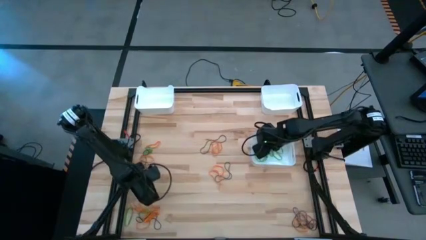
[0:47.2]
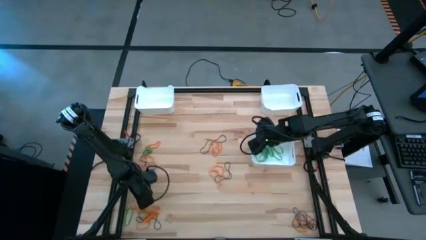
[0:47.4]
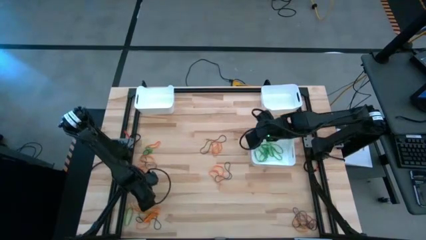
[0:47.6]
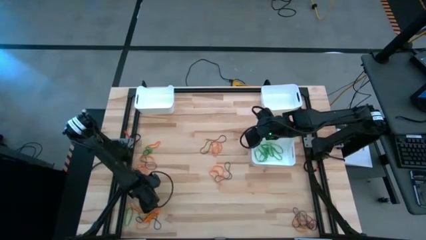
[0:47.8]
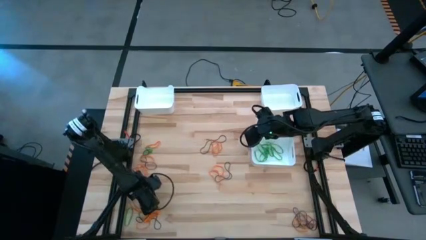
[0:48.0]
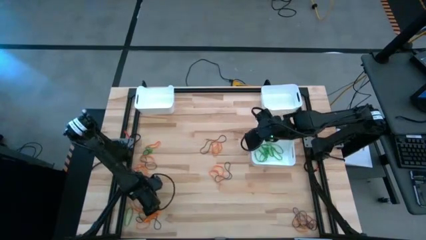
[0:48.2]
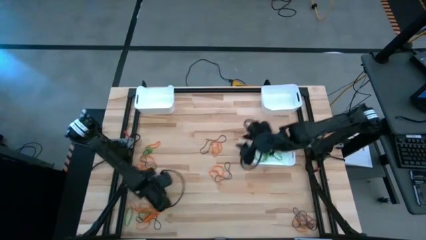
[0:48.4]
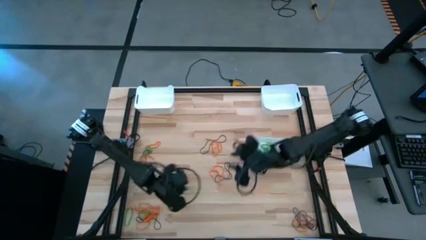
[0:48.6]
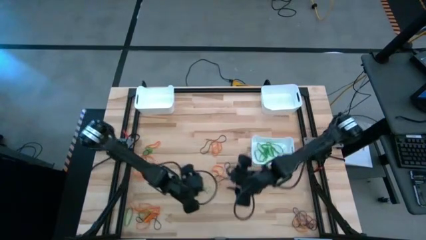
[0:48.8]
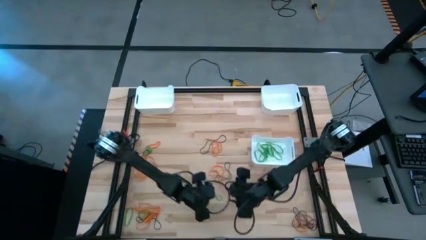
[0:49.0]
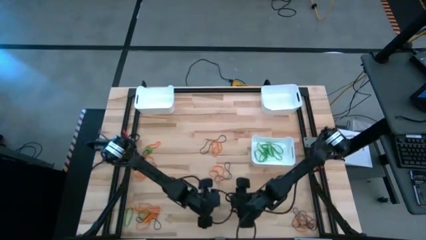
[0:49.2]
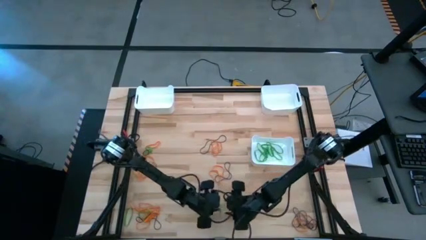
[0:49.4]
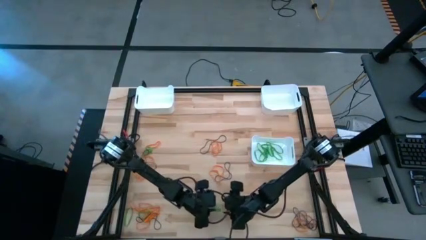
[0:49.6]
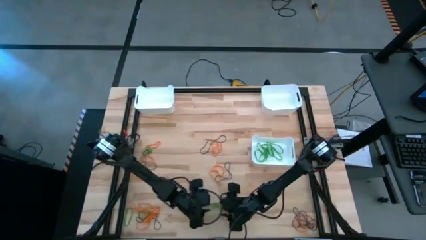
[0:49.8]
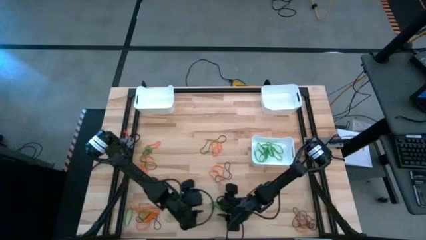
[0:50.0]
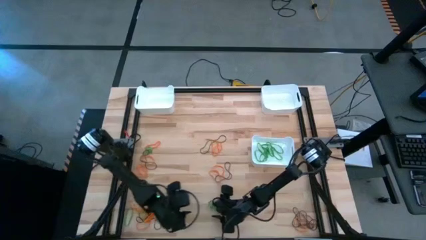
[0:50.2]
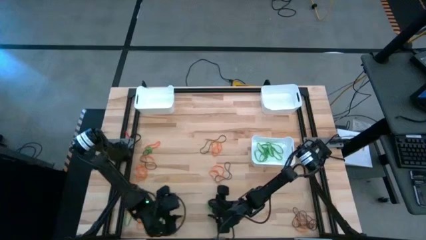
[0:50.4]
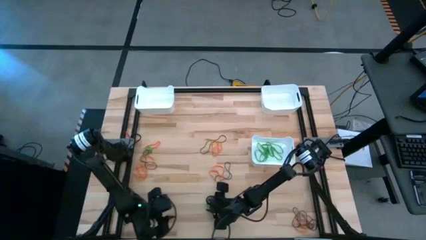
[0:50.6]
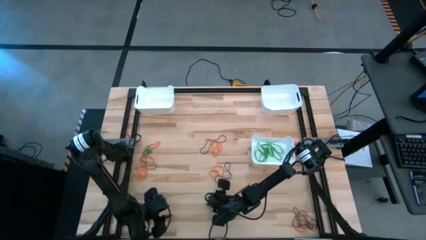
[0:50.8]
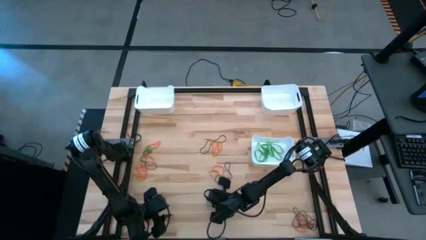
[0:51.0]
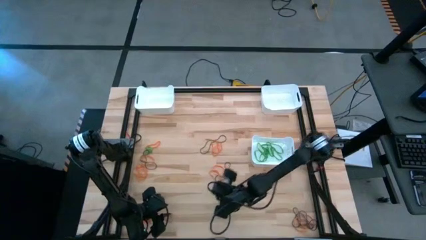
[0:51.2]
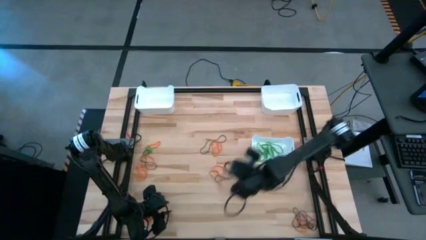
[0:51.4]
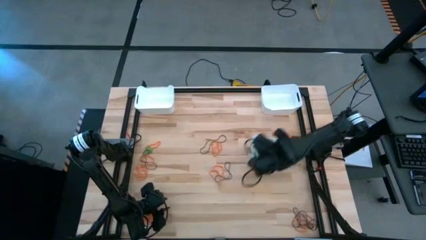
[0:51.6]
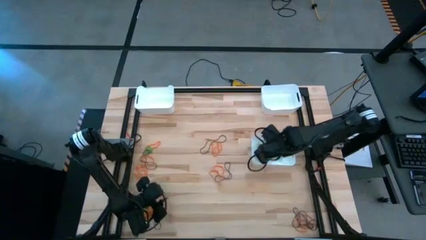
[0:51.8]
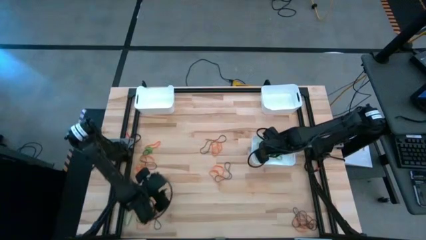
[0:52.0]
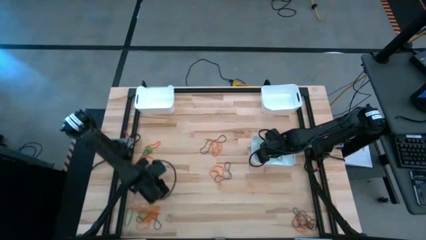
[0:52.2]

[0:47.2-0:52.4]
Task: Sort rubber bands into baskets
Put the green rubber band into the bottom white bin

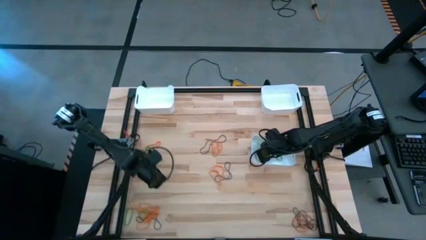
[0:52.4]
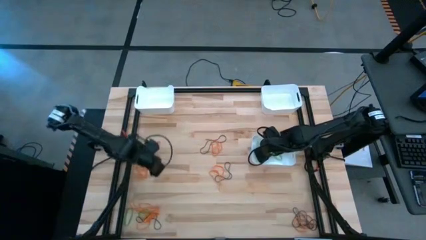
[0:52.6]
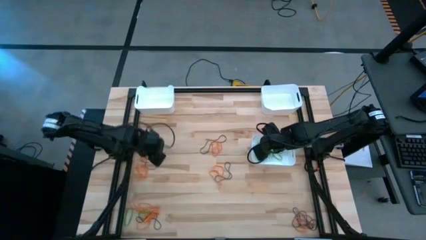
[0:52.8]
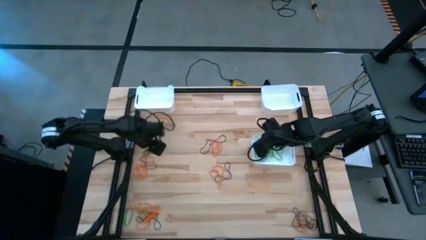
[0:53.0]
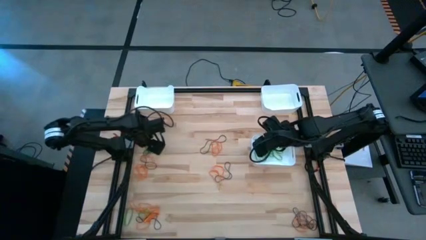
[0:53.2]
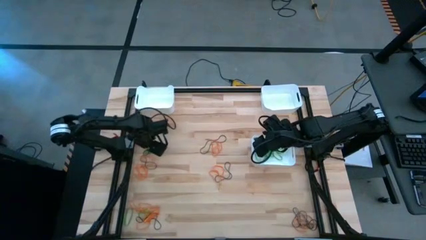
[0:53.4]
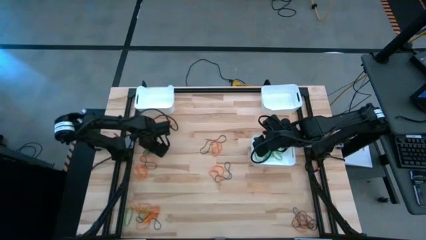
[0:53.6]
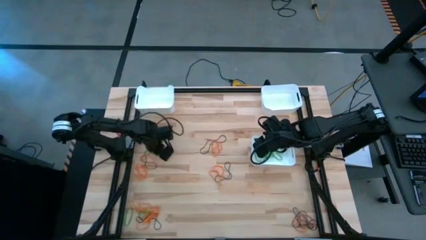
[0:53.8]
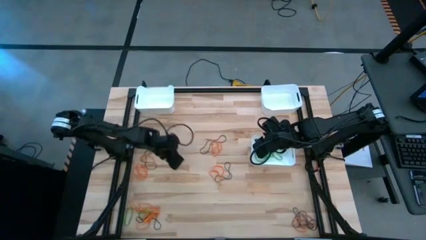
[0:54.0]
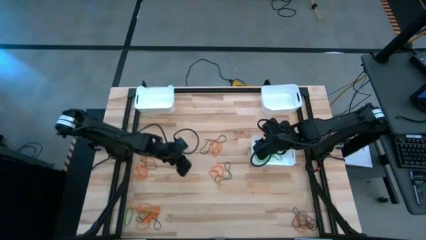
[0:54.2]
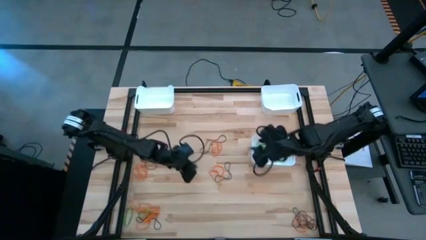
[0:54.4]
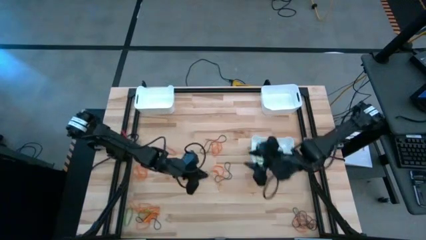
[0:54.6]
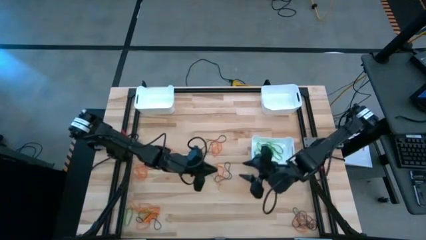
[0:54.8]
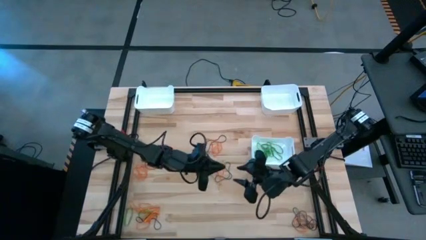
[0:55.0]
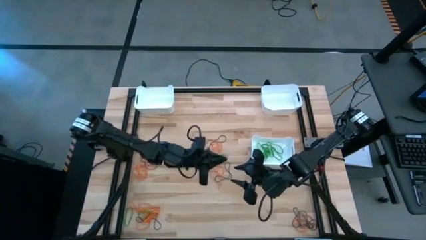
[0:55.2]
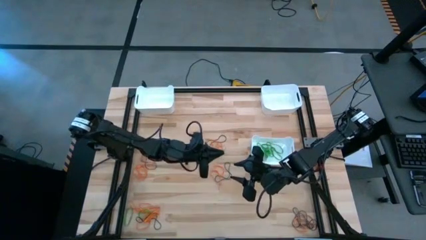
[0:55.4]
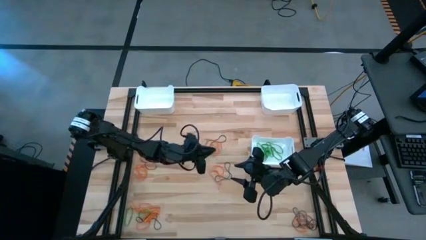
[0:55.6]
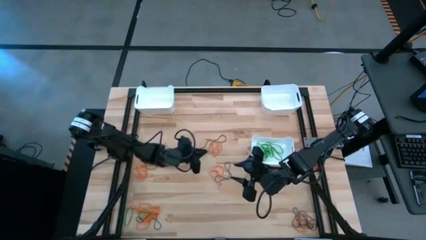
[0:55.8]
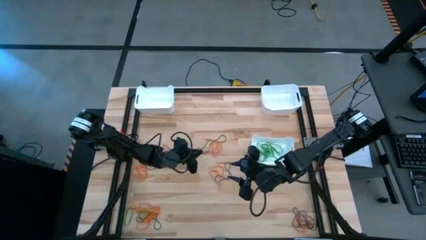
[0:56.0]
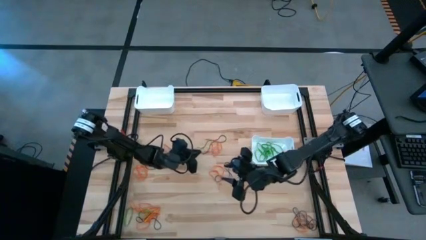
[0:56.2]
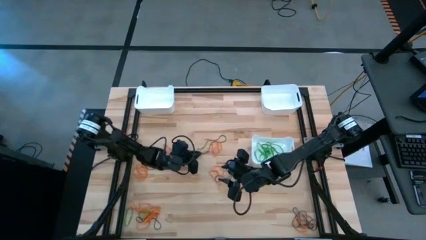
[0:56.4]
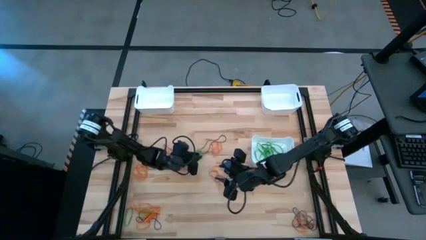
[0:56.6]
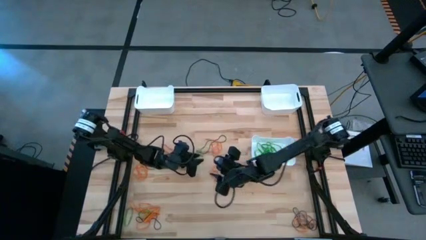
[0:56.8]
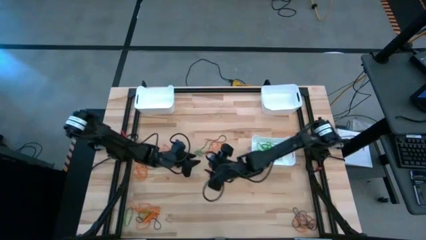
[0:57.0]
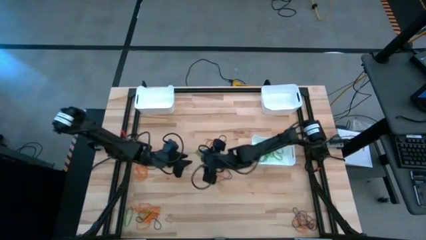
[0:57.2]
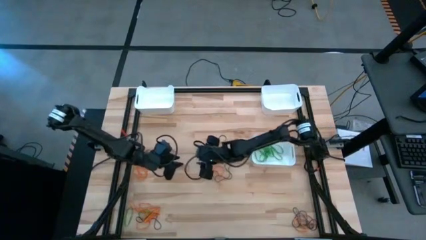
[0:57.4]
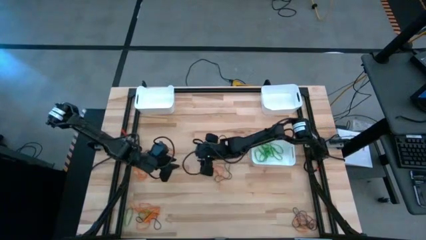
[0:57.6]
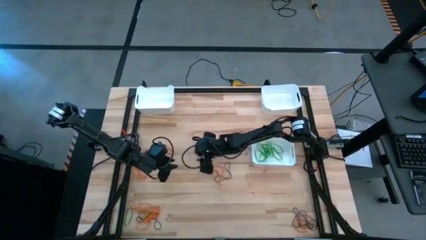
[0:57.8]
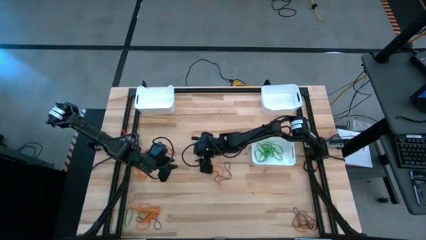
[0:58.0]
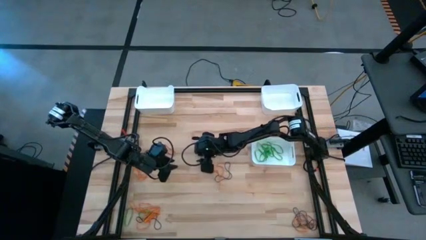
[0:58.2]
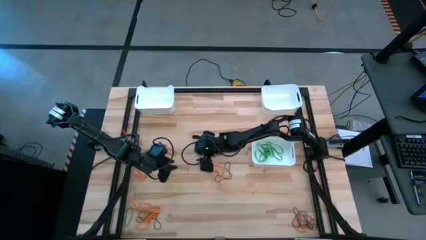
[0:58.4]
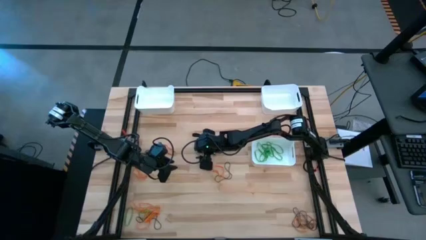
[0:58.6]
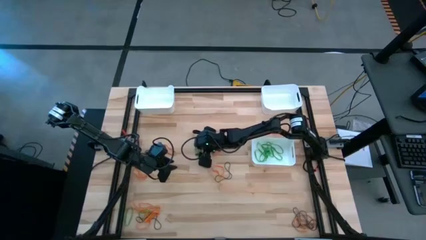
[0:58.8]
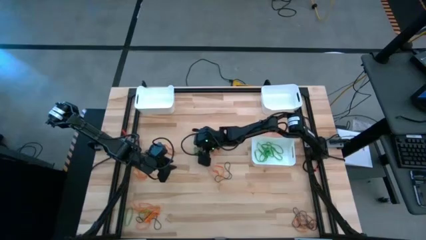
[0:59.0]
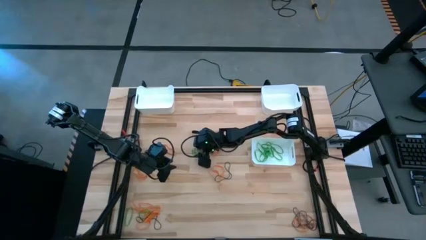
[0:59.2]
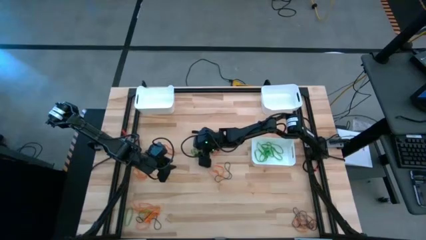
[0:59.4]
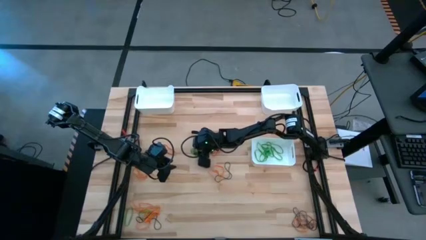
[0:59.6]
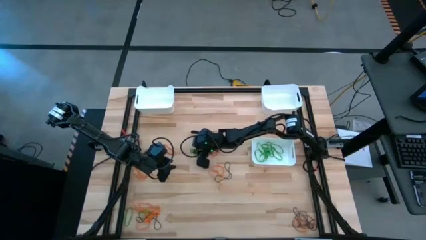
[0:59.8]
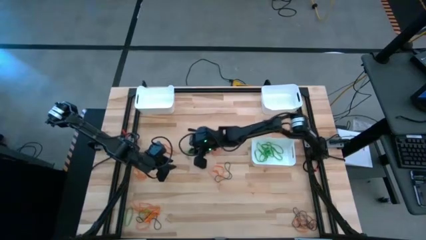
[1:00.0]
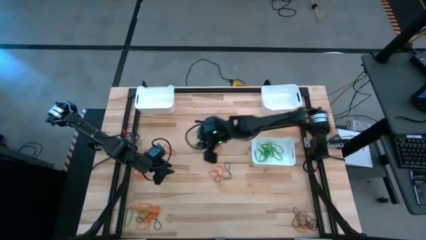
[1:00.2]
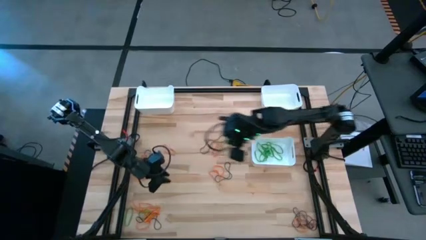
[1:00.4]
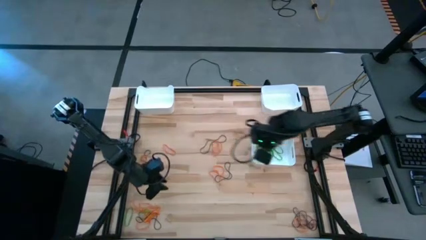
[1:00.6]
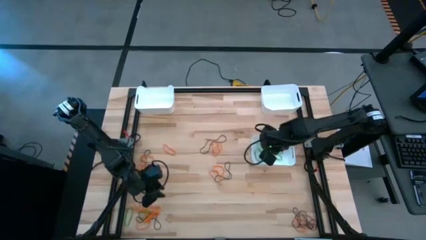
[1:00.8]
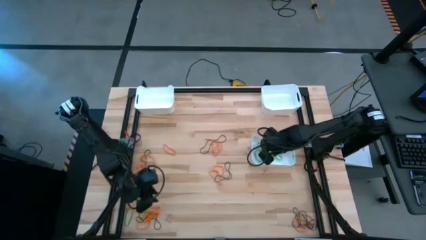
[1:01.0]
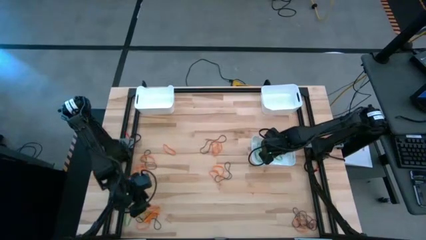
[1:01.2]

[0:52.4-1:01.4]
Put the green rubber band into the bottom white bin

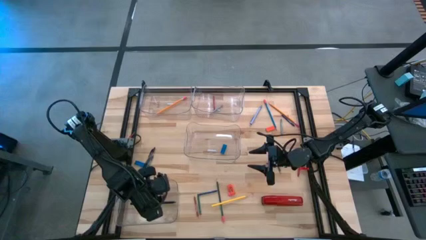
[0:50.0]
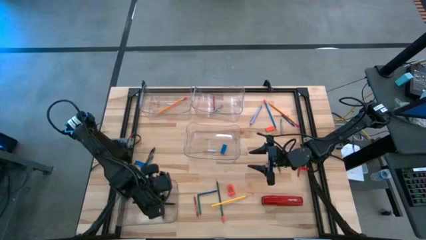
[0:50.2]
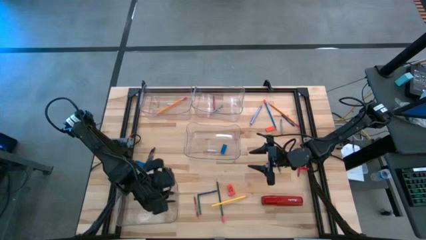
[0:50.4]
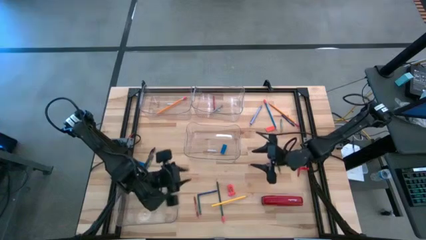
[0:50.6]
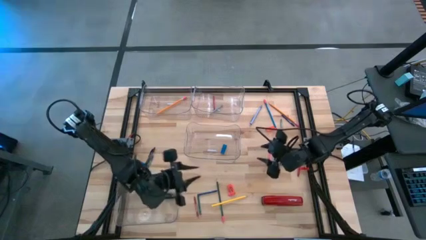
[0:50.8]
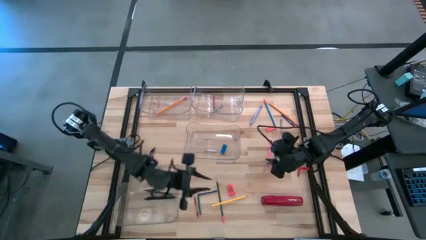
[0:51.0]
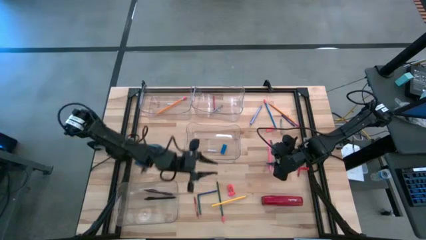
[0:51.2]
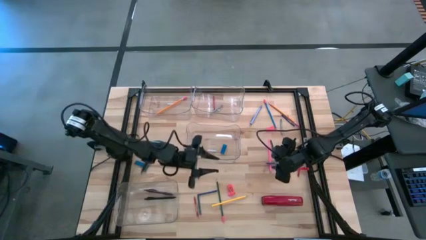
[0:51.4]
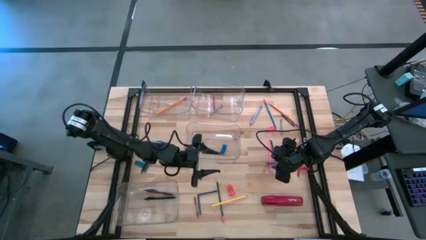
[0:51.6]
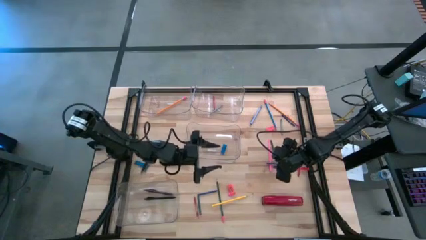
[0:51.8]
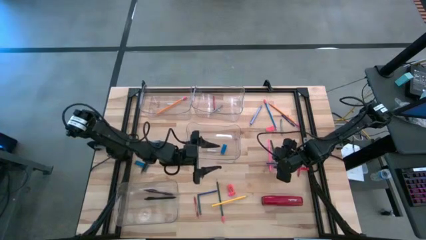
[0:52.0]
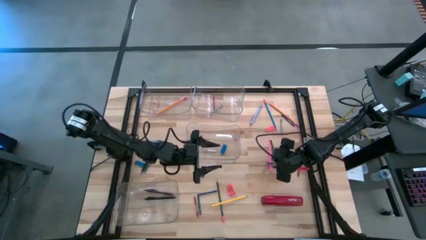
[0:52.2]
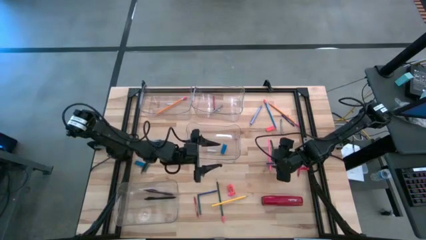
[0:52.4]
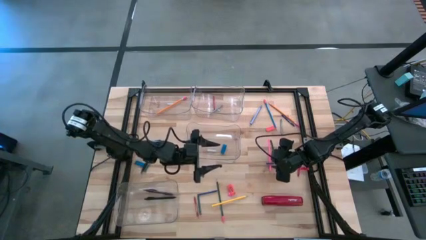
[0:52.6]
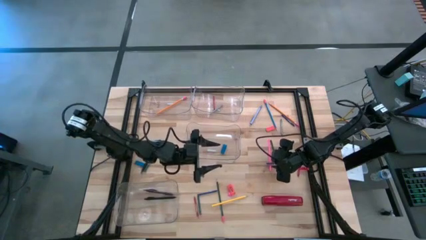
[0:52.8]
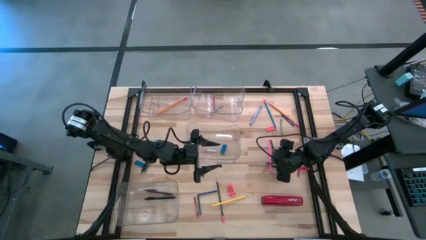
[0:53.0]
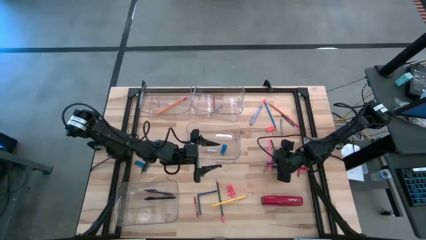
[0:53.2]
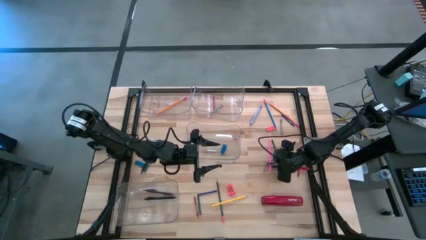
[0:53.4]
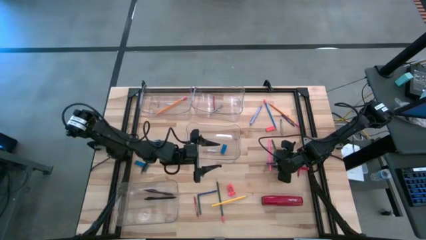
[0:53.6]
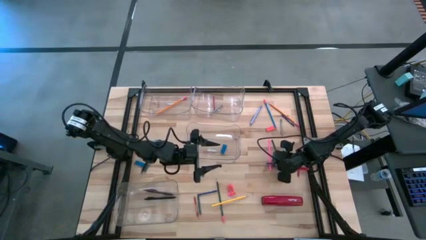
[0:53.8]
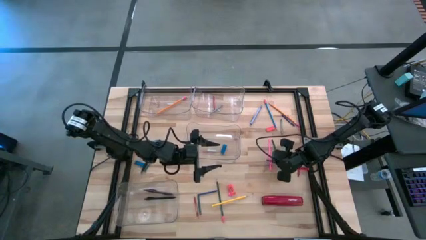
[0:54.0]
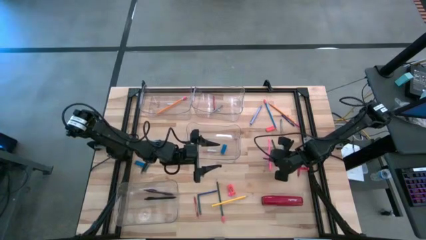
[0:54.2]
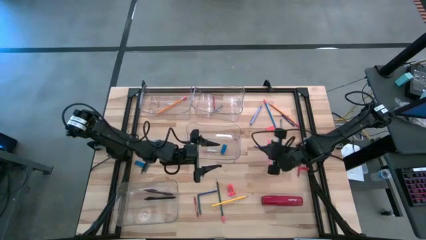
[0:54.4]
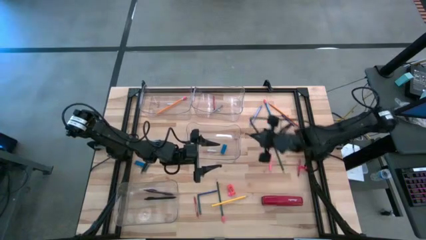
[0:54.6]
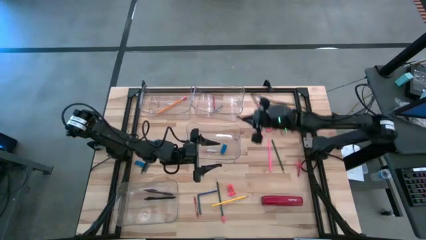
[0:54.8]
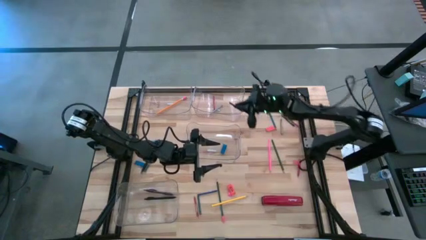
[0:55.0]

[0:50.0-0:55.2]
Task: Sort crayons/erasers/pens/pencils in bins
Put the middle blue crayon into the top right transparent bin
